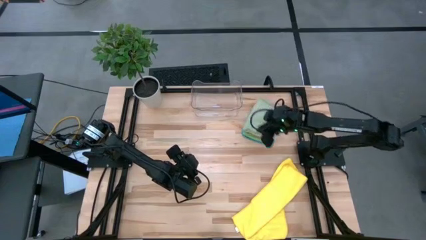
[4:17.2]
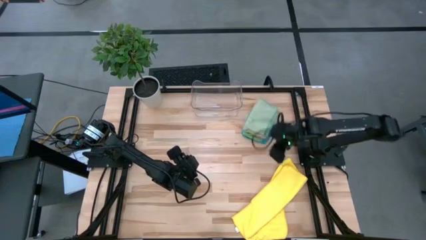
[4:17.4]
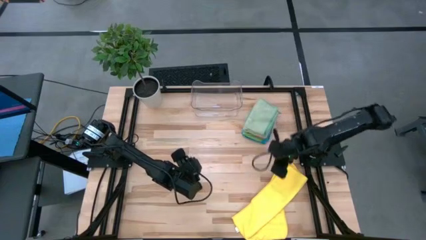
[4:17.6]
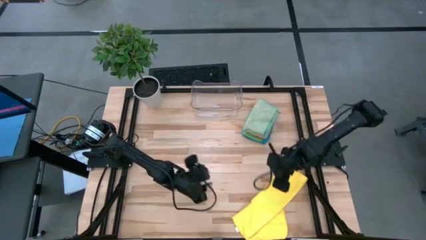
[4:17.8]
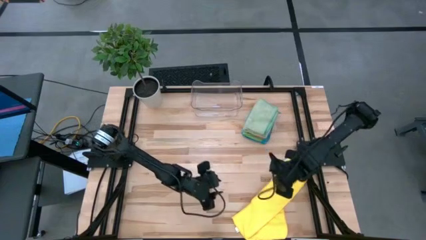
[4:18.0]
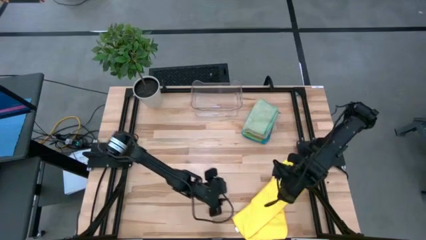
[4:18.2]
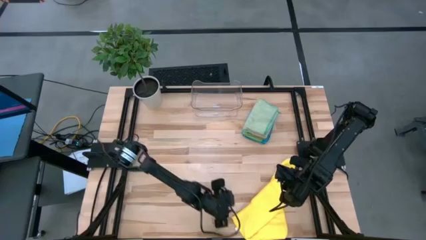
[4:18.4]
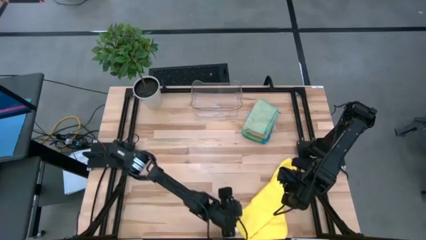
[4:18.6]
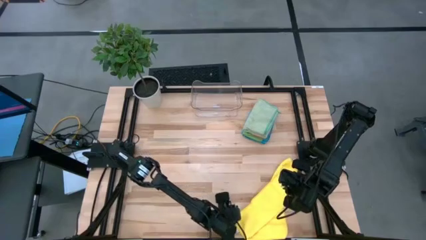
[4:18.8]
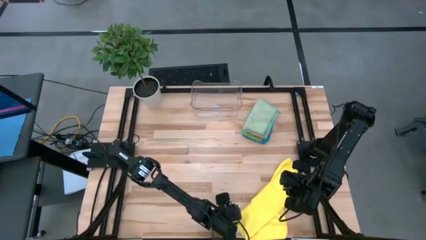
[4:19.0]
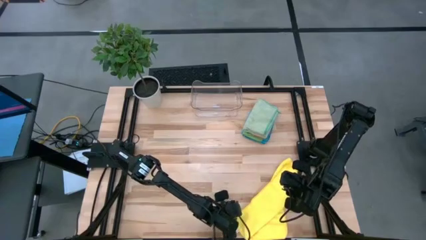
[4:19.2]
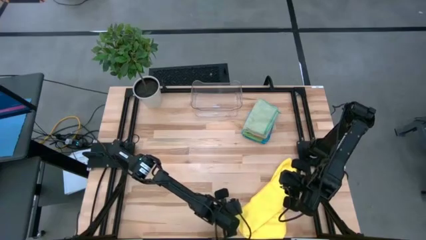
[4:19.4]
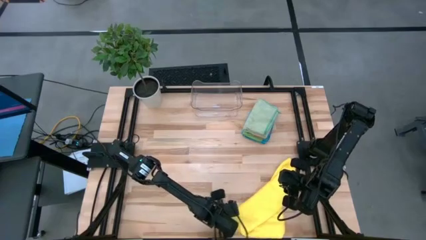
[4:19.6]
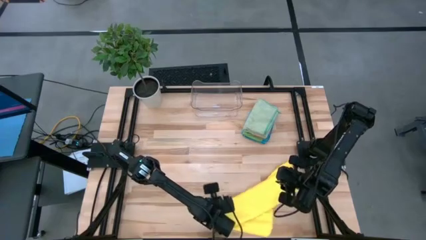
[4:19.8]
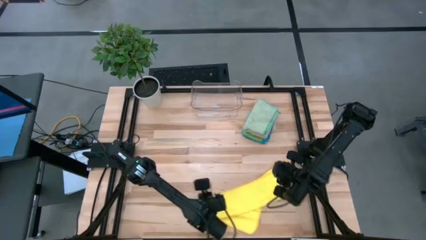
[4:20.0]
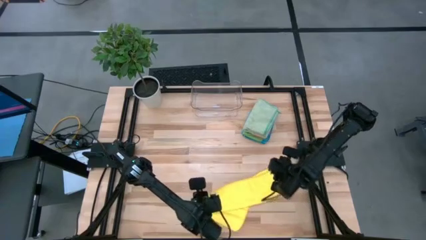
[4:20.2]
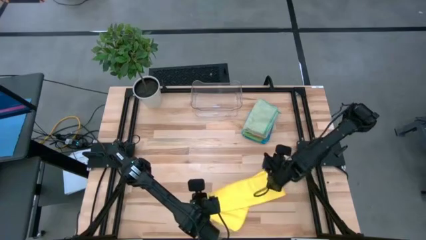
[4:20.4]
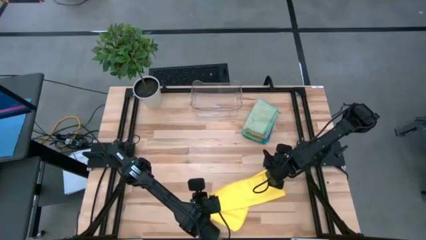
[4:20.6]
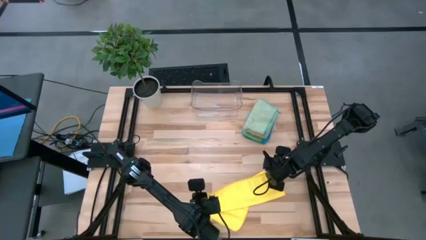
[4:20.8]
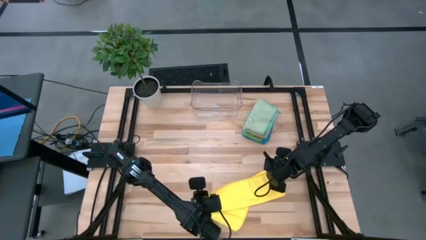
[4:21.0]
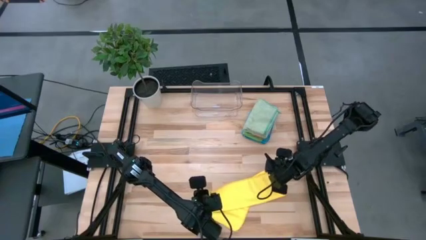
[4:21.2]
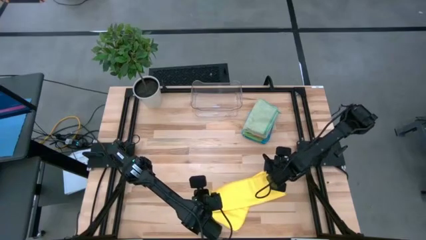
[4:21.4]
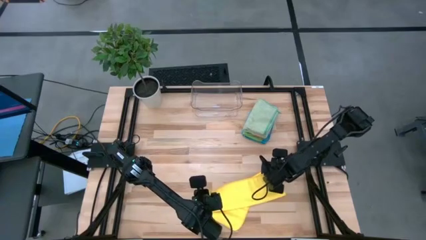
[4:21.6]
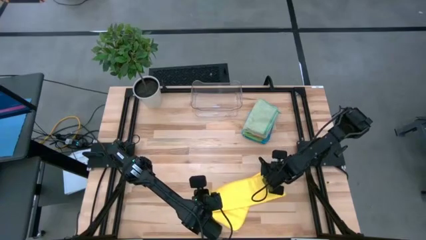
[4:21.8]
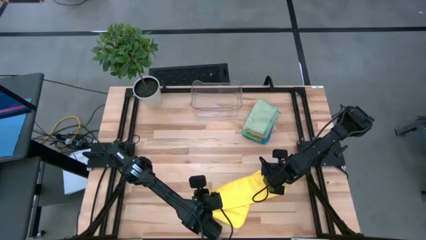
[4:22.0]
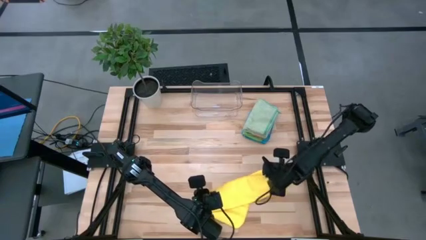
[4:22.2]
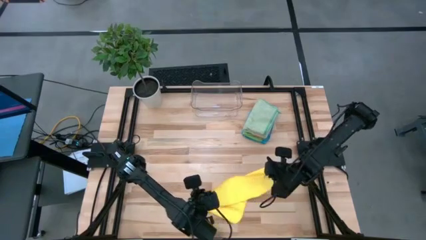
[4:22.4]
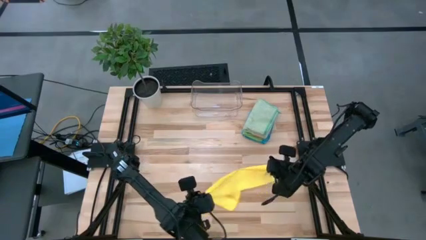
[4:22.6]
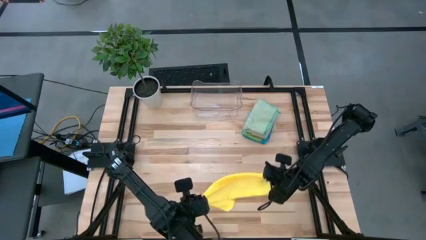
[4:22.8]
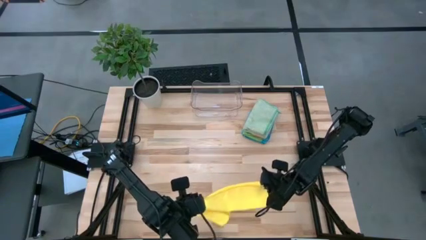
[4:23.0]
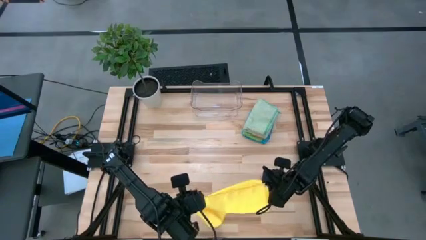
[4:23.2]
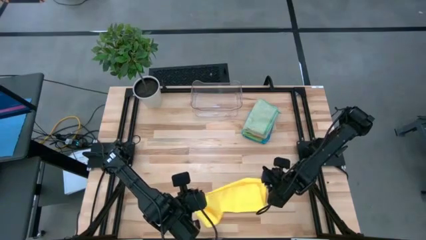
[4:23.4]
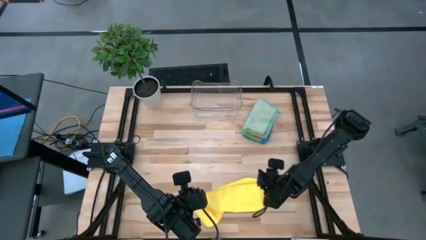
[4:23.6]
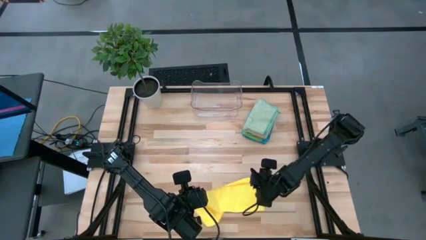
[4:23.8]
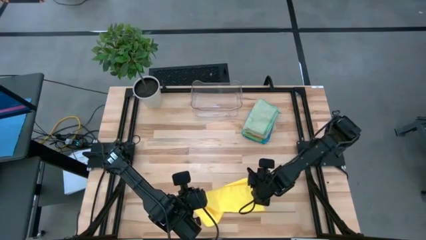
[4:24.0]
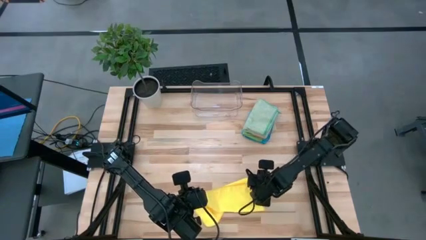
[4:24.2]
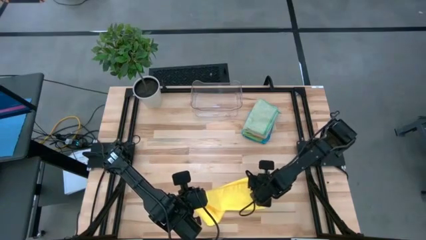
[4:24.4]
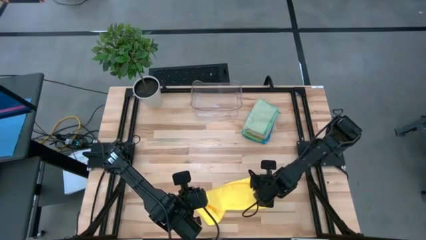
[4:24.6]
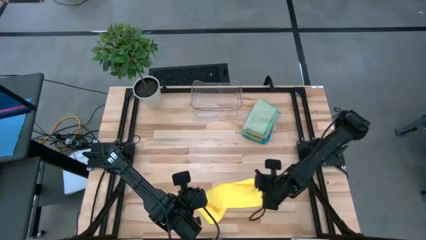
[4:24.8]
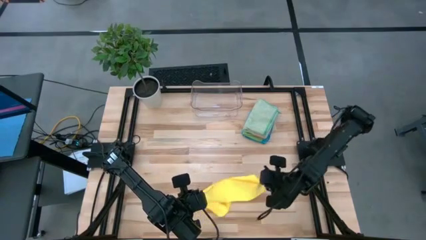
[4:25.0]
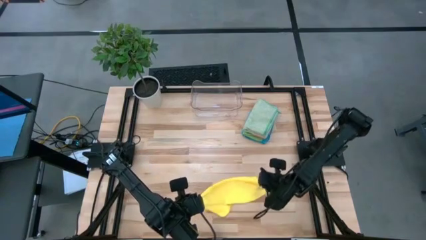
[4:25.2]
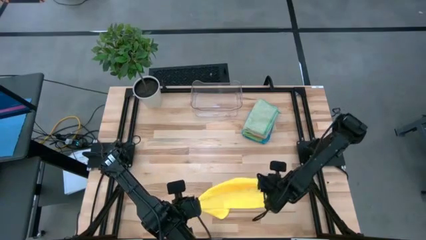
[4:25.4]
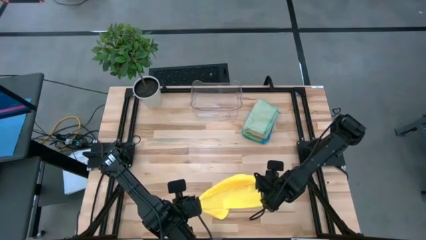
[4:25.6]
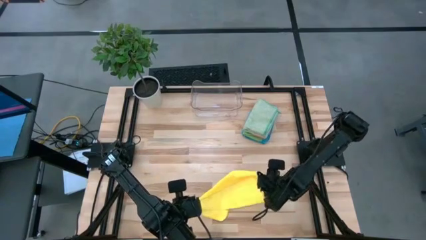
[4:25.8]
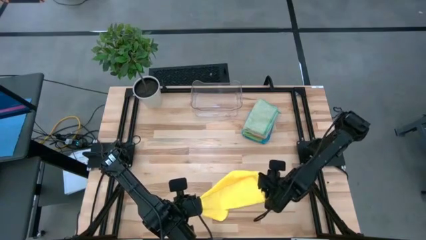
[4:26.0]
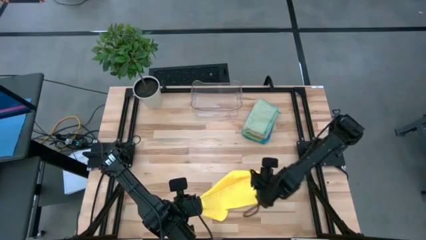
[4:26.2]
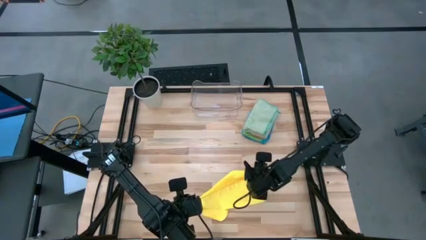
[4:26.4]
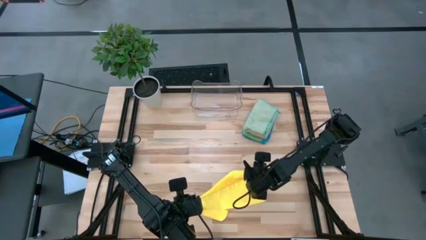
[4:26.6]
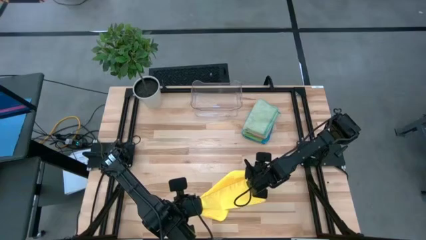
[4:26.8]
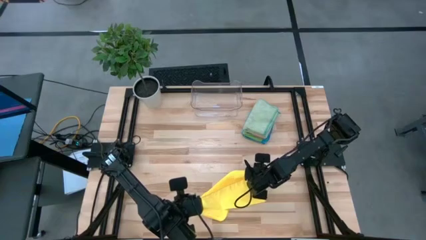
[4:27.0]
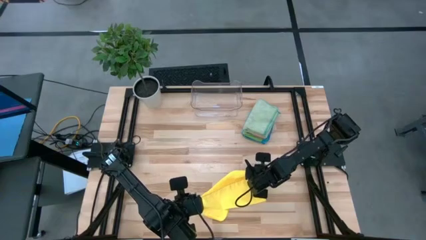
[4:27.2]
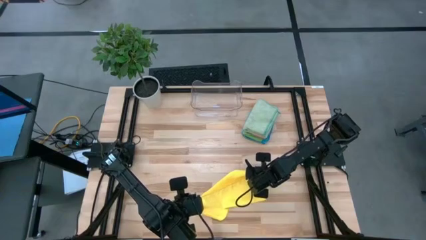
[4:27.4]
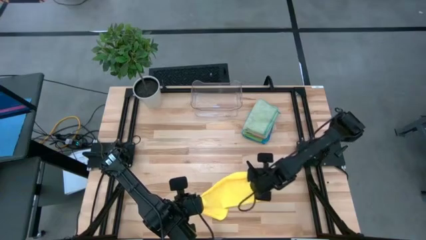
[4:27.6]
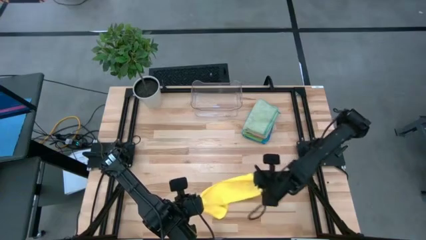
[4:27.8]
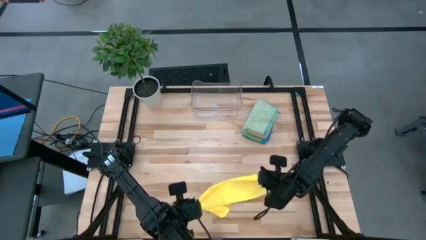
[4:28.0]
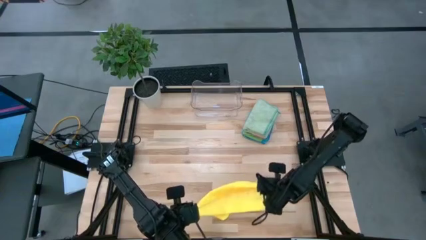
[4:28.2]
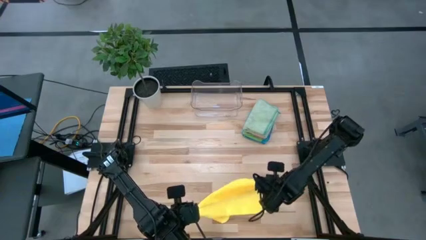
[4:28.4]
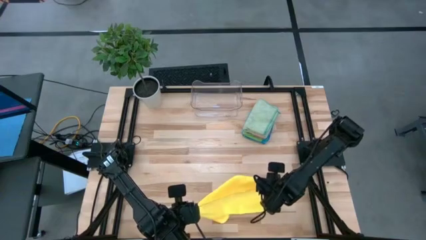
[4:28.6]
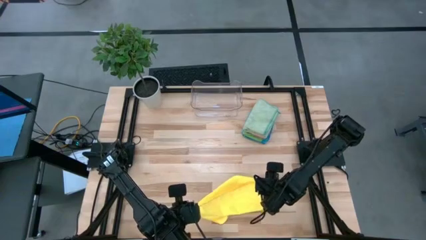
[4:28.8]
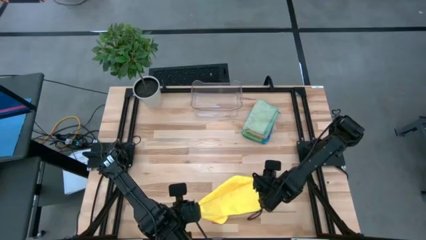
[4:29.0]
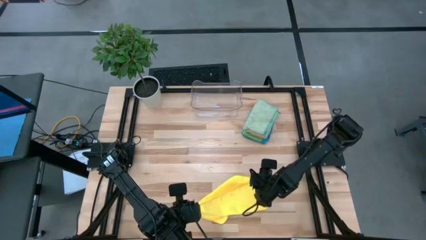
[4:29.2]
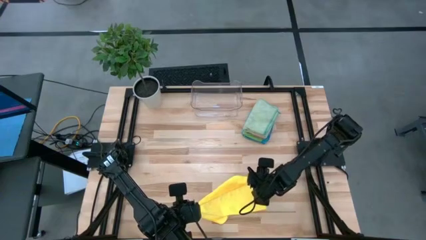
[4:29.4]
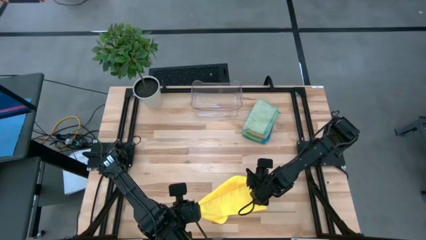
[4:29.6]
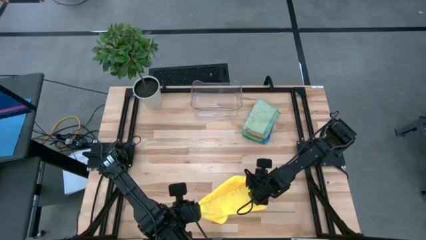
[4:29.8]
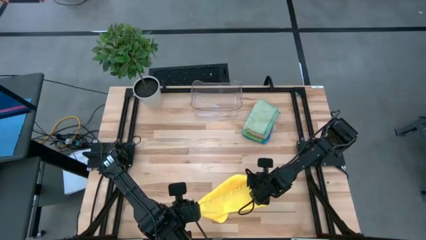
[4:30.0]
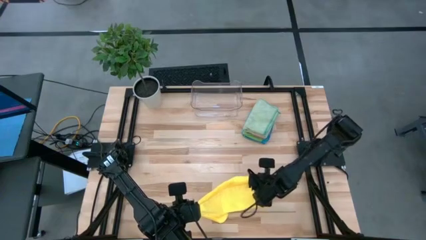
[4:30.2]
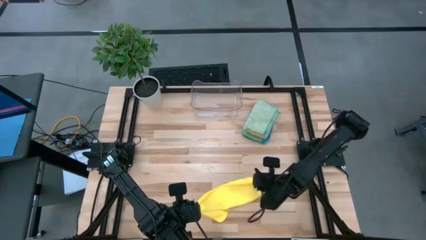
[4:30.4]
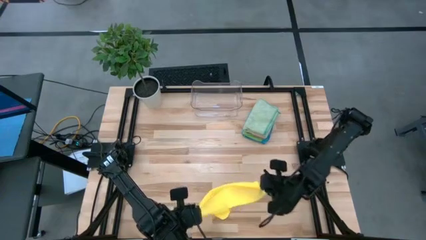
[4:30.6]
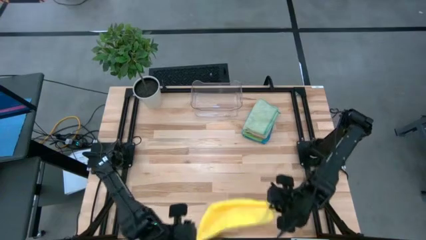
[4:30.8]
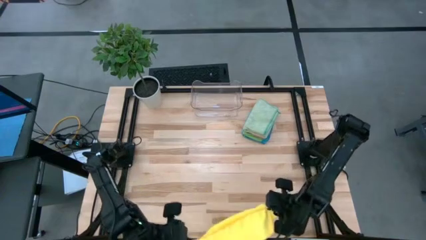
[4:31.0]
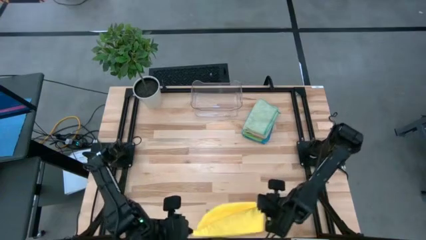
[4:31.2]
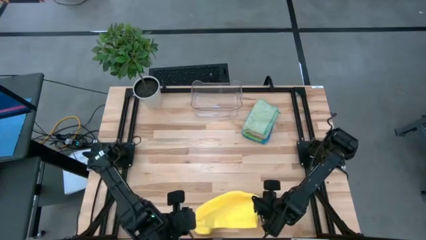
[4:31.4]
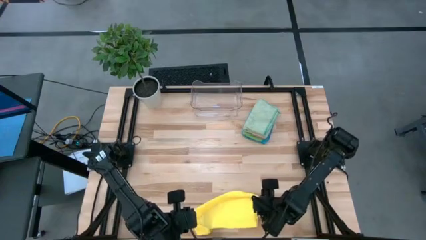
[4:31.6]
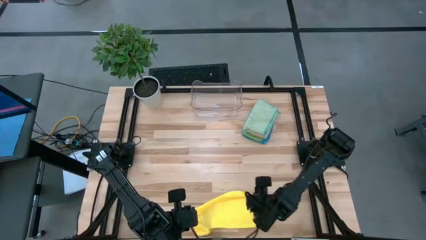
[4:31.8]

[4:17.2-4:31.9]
Task: Fold microfiber towels
Fold the yellow microfiber towel

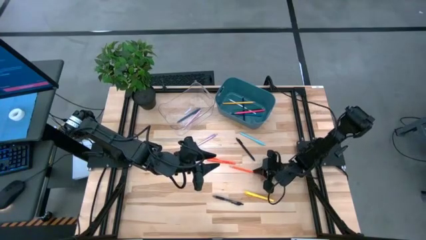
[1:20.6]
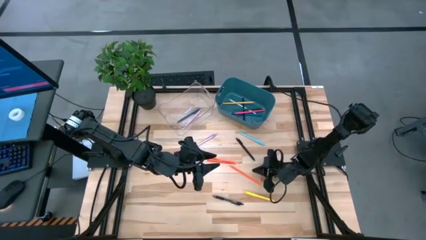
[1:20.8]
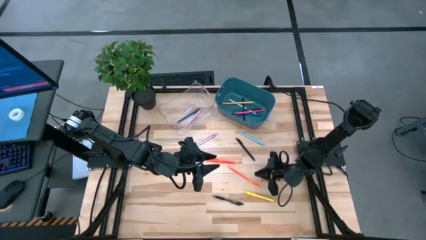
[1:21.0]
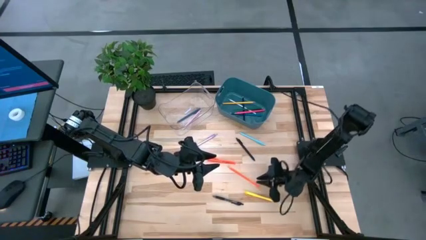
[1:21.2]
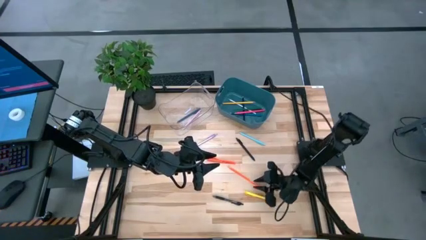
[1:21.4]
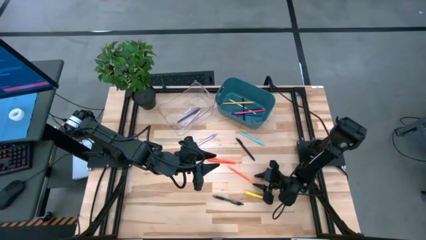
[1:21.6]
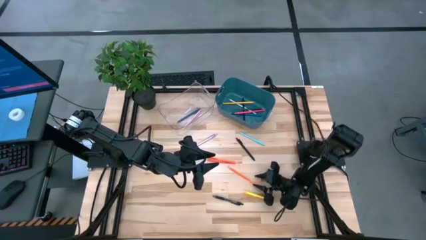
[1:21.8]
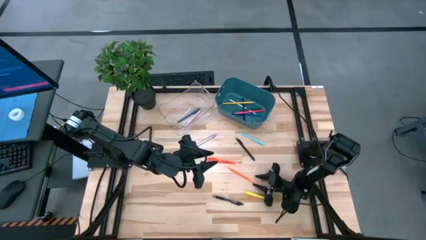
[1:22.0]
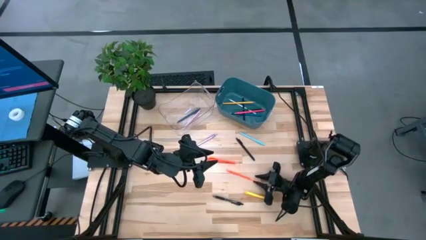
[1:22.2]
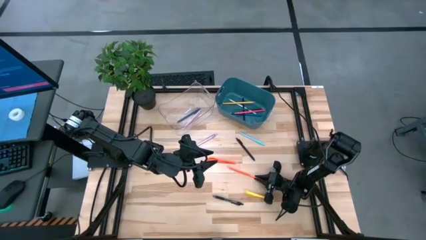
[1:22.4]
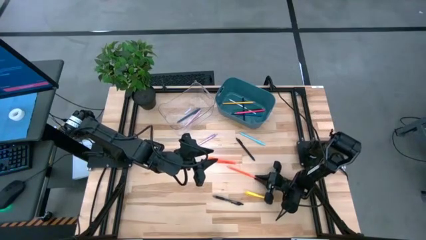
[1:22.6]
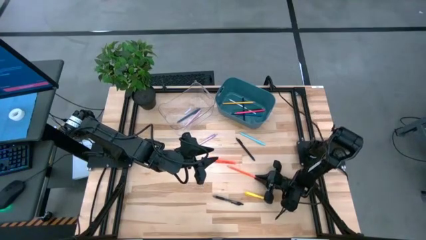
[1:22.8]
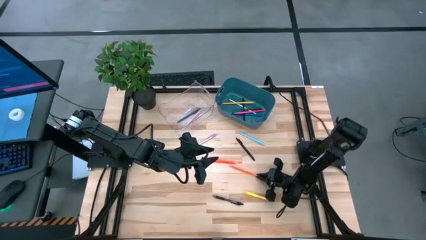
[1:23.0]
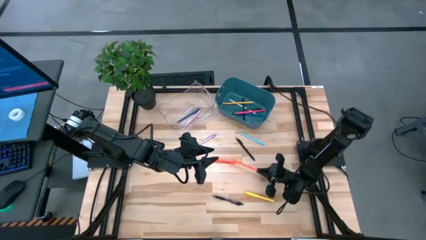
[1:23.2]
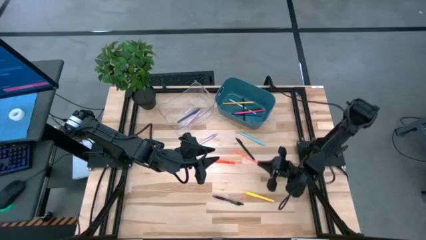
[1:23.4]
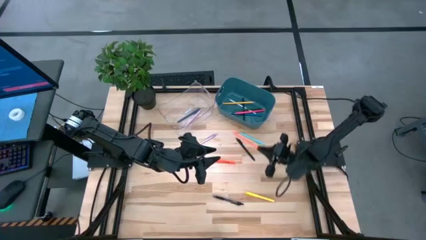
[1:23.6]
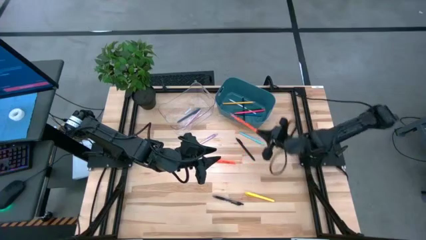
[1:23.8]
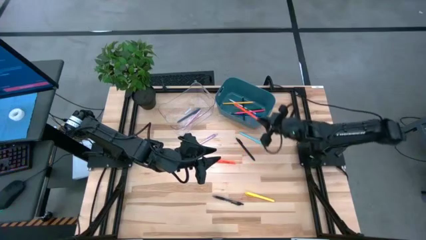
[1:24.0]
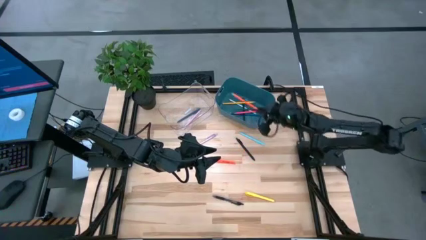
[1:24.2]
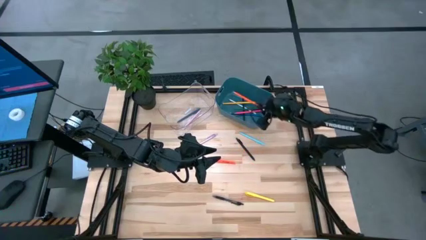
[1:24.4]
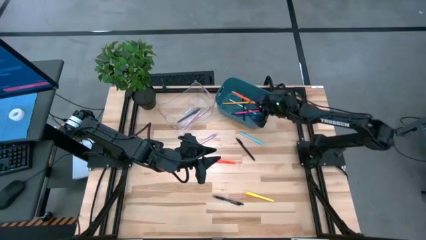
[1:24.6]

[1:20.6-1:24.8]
Task: Sort pens & pencils
Put the orange colored pencil into the blue bin
